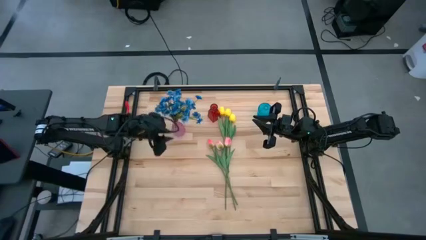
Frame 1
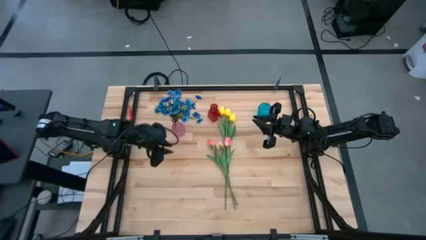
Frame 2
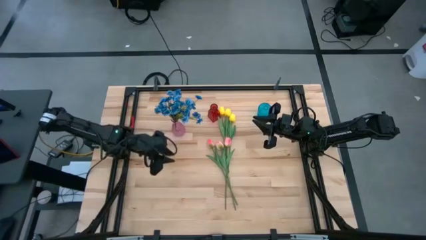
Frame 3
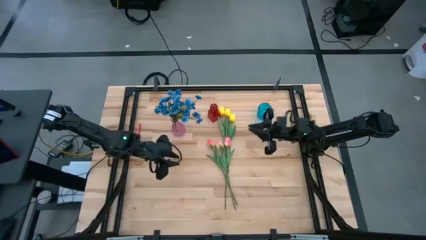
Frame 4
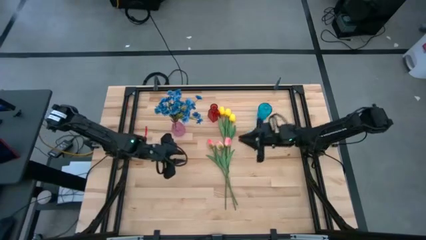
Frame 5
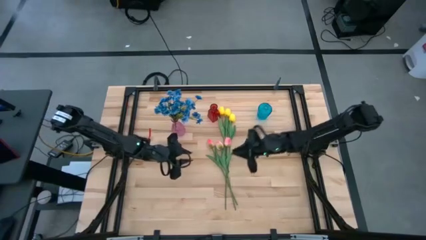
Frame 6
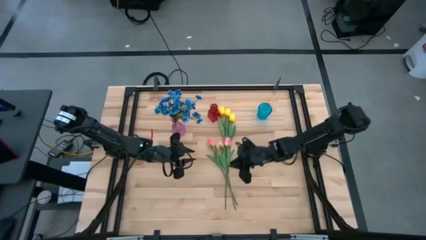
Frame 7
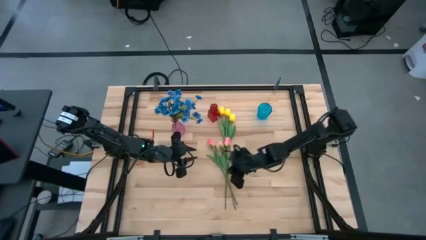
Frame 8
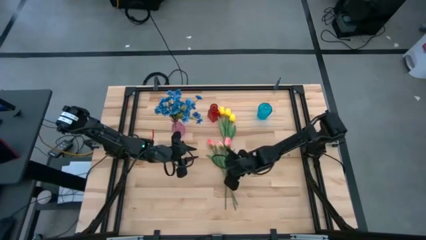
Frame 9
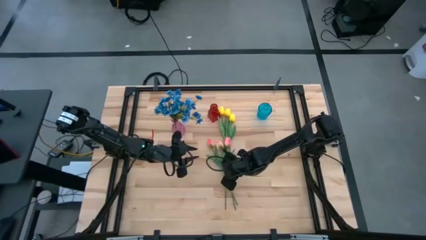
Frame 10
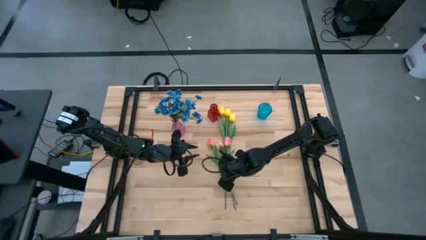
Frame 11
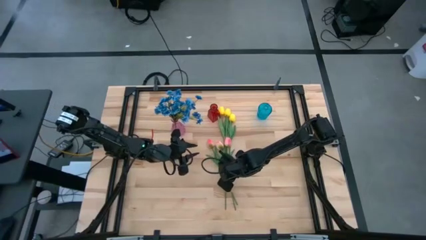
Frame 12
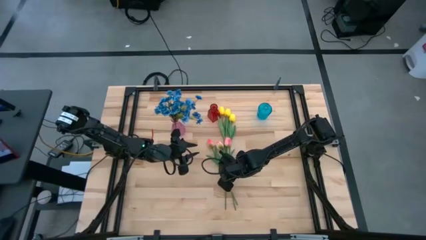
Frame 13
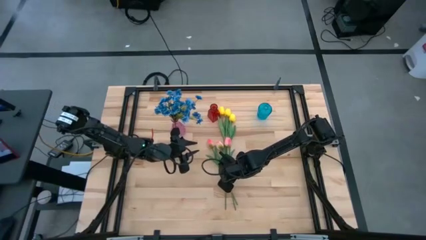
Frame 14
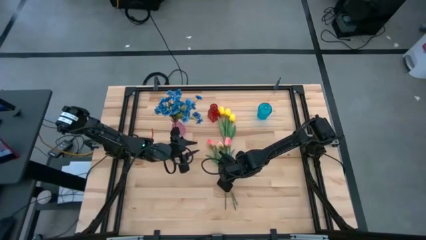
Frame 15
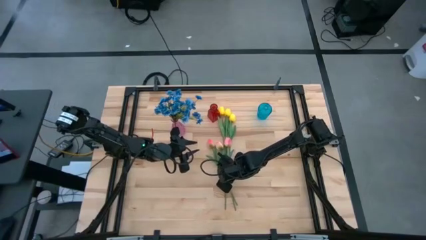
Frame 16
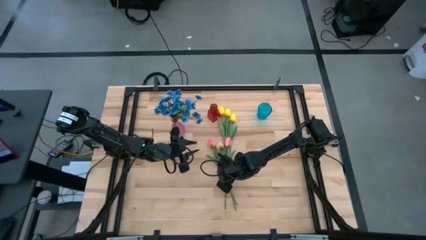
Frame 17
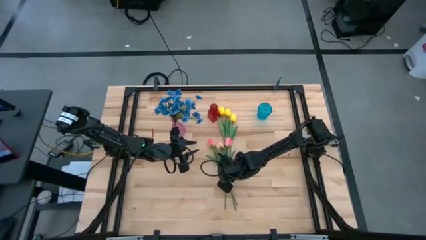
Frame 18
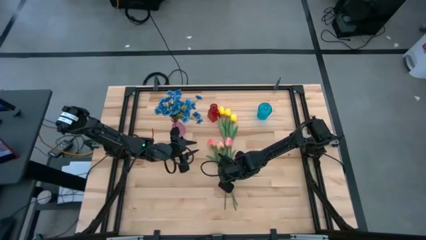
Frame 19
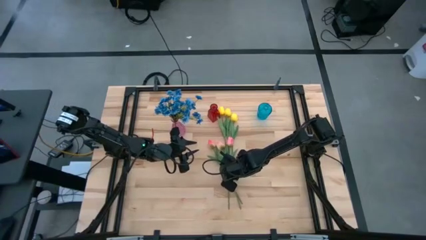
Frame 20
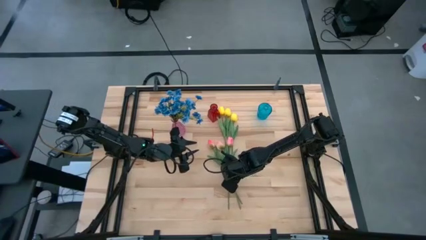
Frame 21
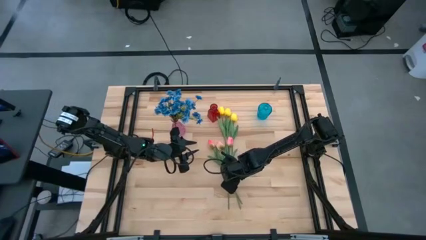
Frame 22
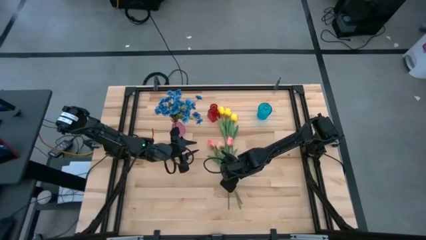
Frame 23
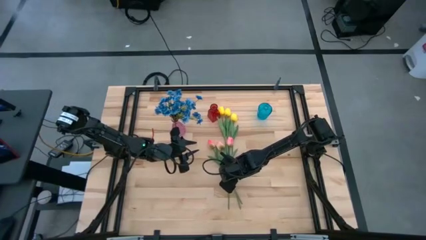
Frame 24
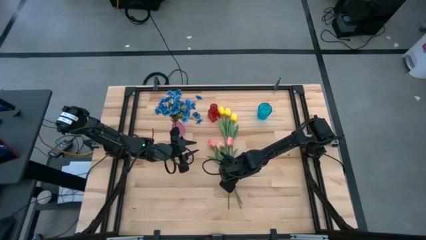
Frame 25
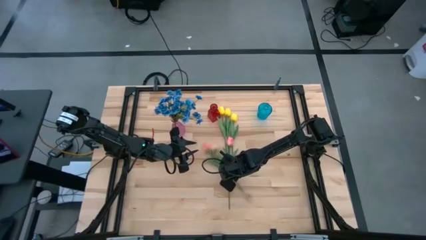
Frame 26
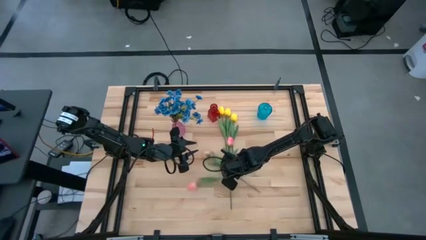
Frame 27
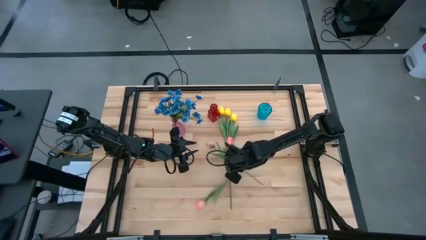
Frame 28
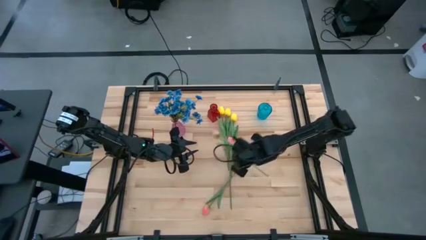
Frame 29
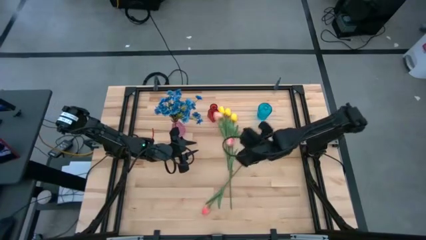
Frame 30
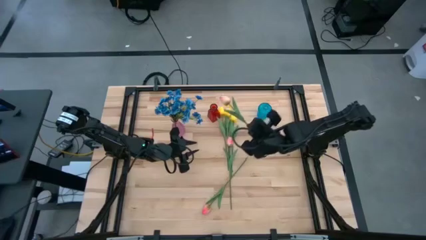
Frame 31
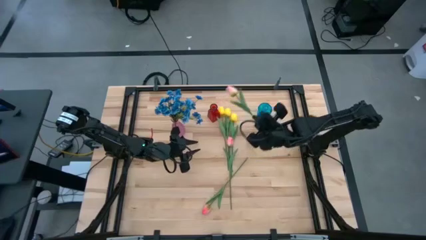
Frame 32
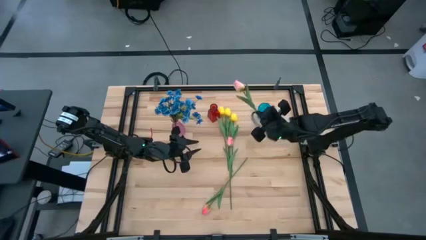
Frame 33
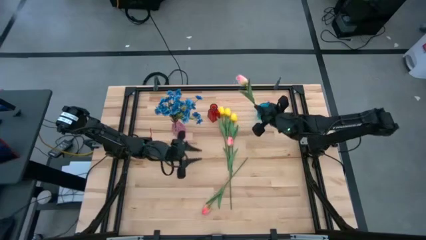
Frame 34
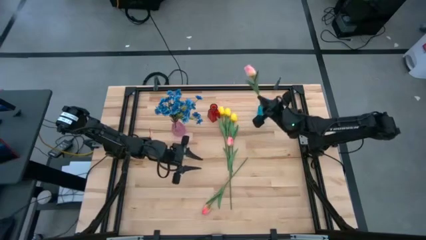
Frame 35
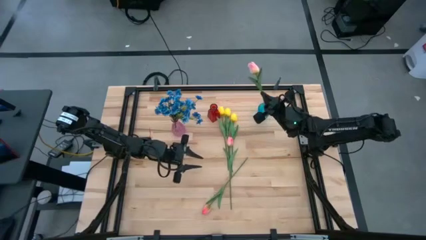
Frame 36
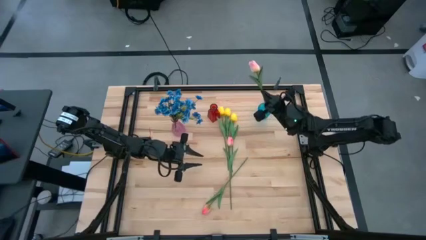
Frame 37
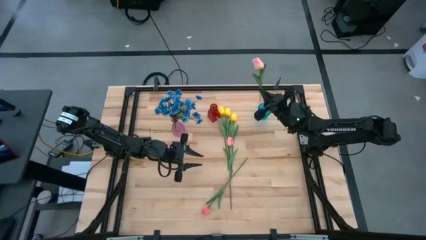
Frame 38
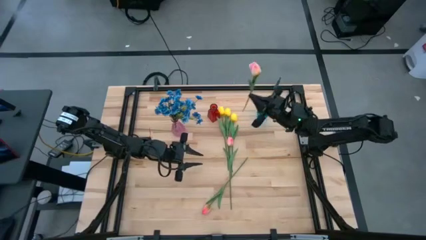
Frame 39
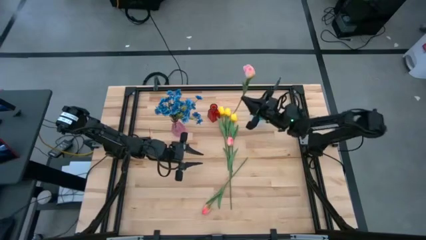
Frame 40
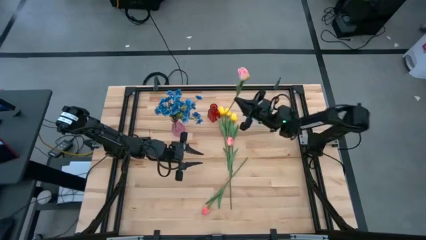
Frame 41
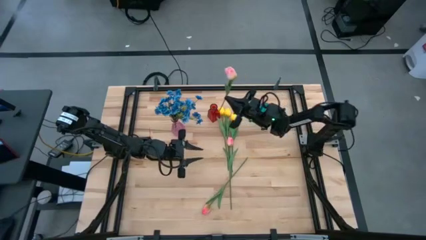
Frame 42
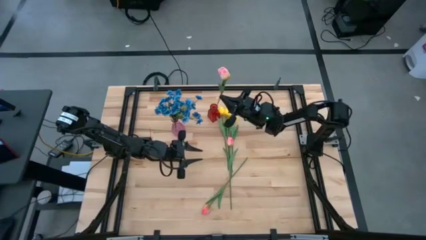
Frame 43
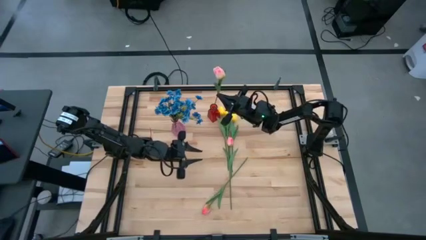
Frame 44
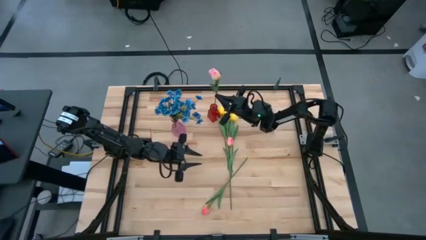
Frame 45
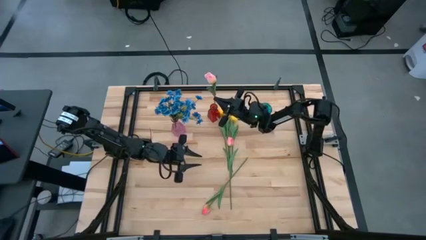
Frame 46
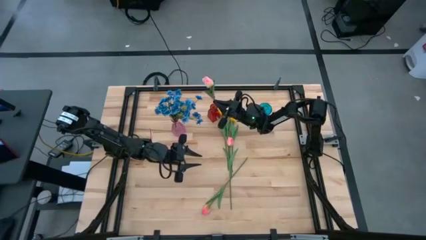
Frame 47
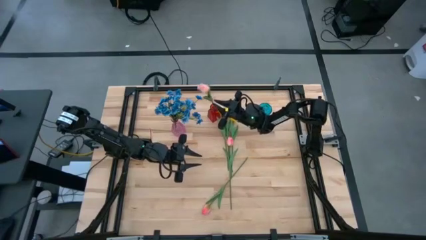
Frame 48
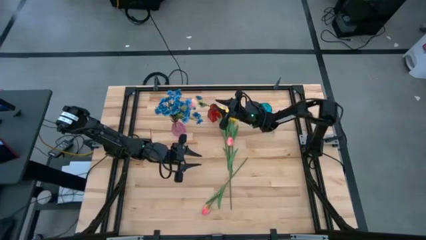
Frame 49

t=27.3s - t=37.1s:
Task: Sort flowers into vase by color
Put the pink tulip into the red vase

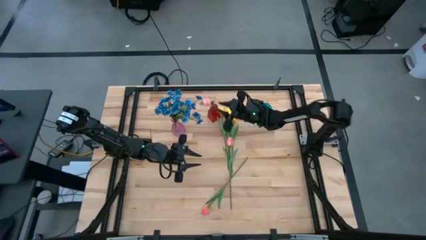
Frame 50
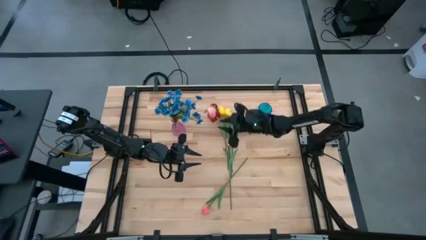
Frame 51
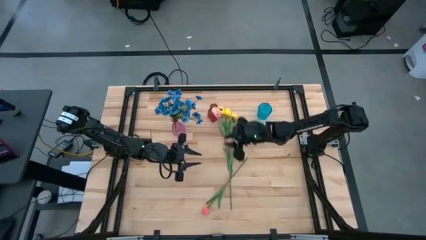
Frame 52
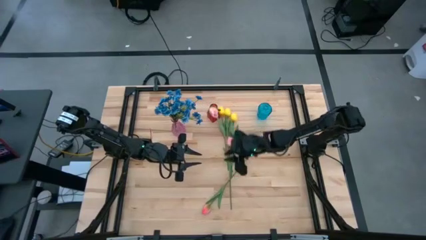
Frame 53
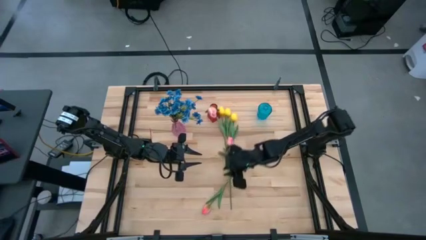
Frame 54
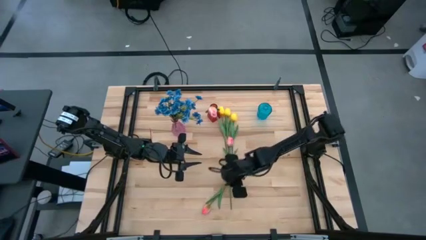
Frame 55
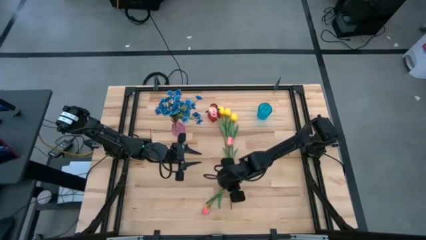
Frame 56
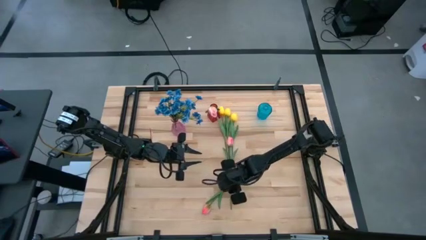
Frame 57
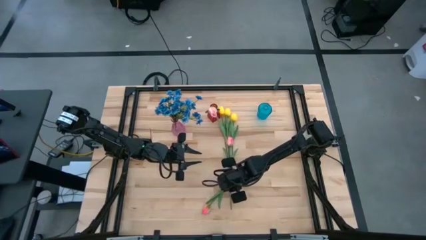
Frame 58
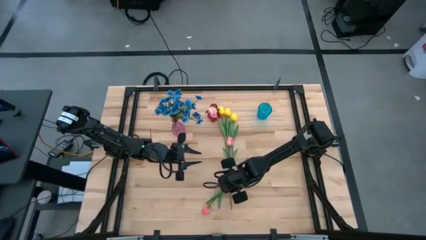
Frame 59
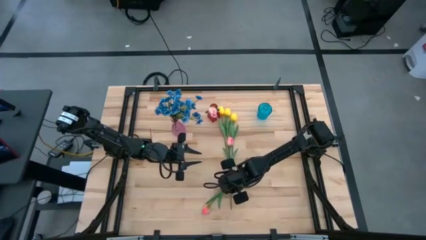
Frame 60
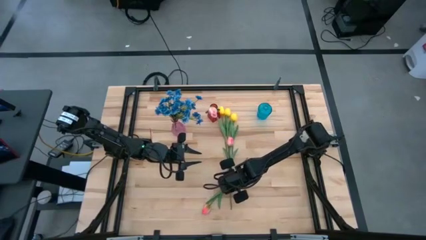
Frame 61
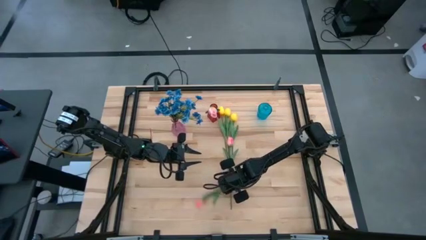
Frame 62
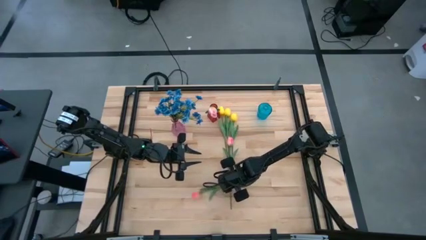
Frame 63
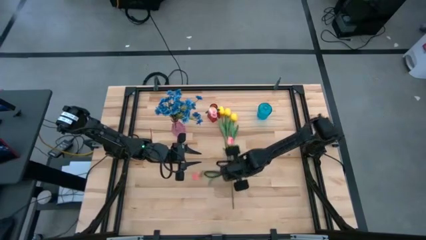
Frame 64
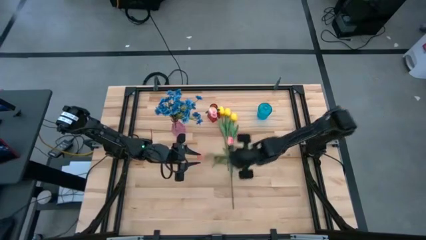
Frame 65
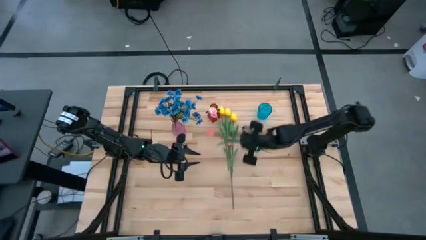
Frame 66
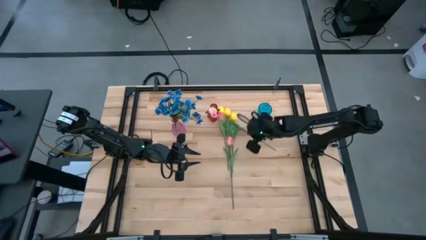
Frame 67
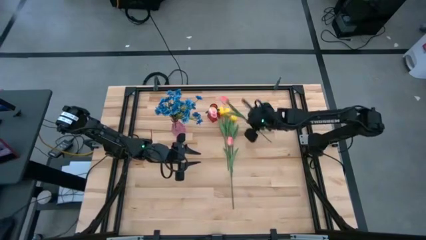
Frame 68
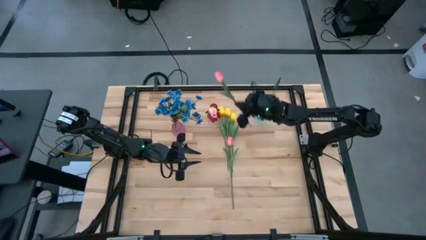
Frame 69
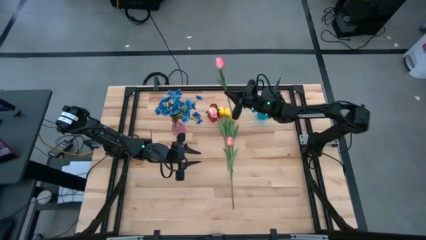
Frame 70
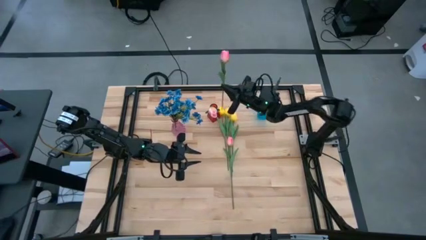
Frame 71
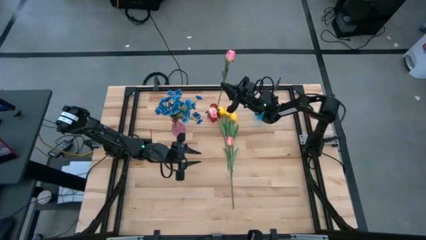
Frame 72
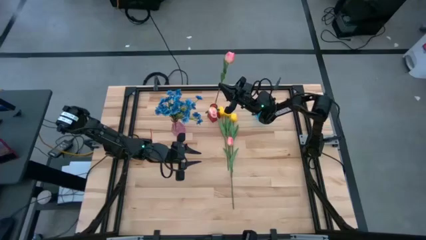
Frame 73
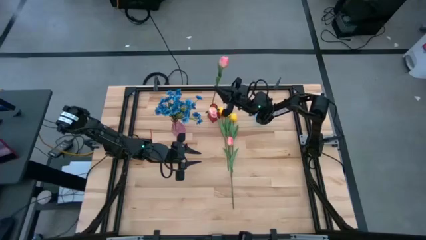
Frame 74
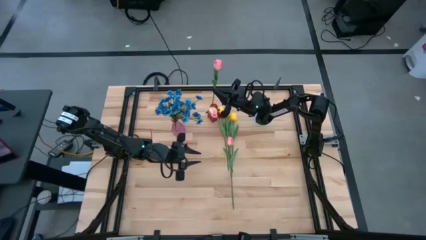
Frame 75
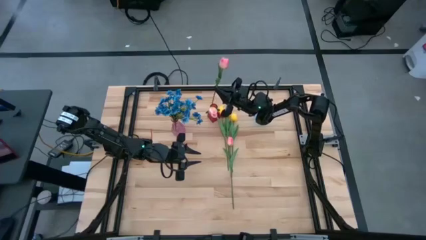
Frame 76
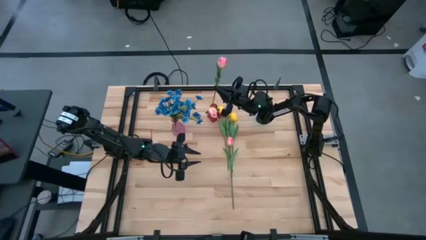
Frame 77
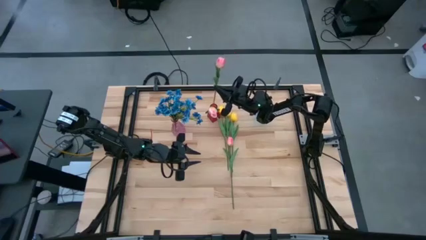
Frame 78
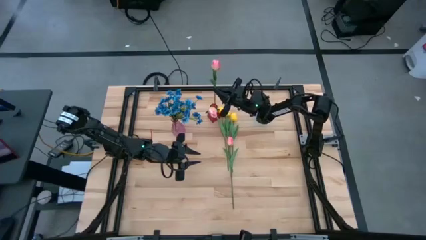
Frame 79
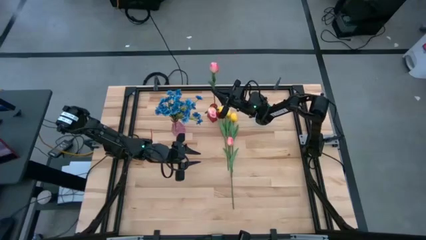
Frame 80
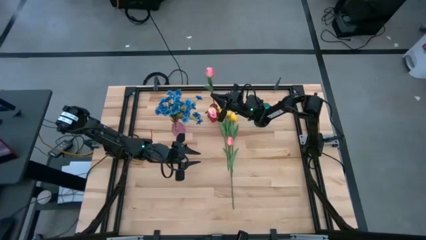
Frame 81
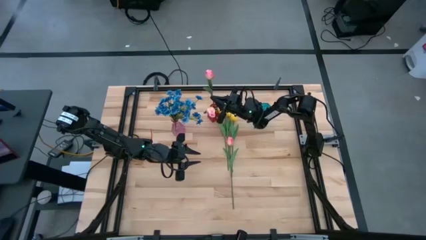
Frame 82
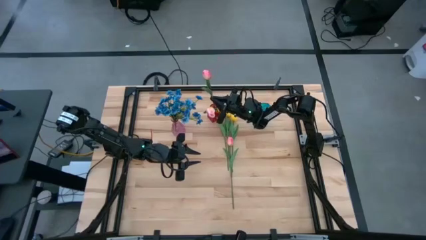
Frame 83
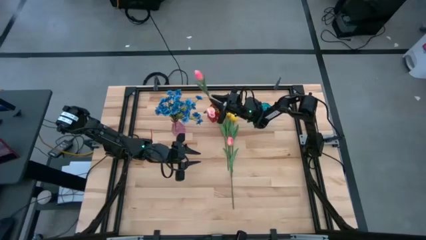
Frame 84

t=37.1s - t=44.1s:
Put the pink tulip into the red vase
